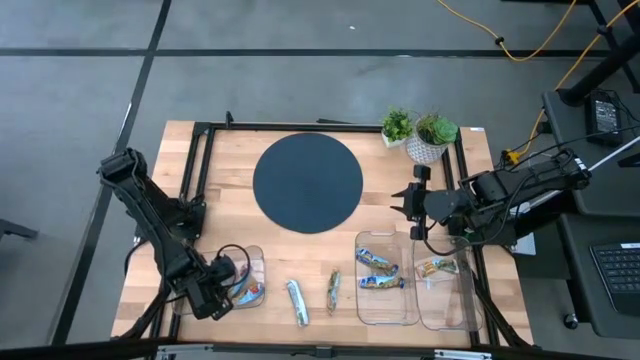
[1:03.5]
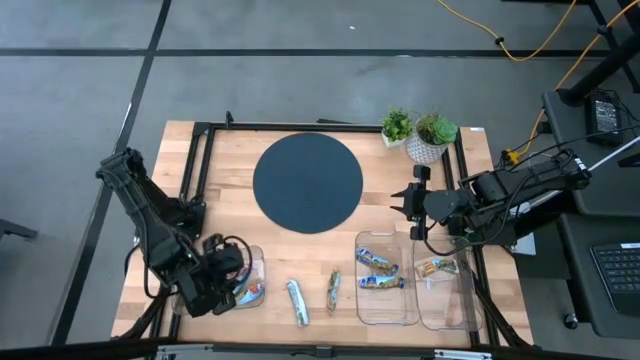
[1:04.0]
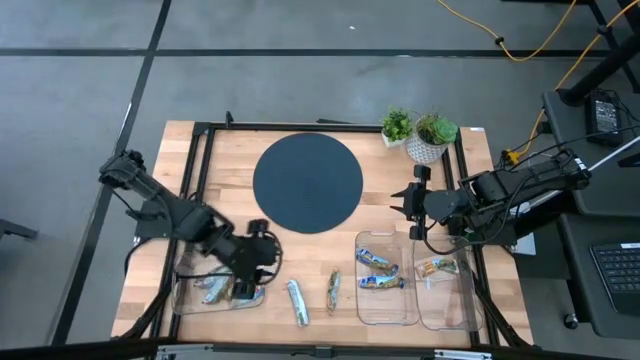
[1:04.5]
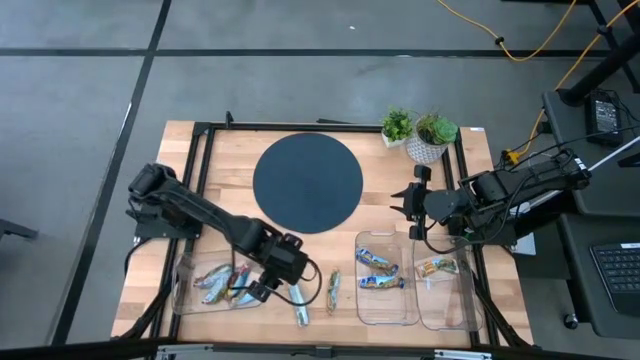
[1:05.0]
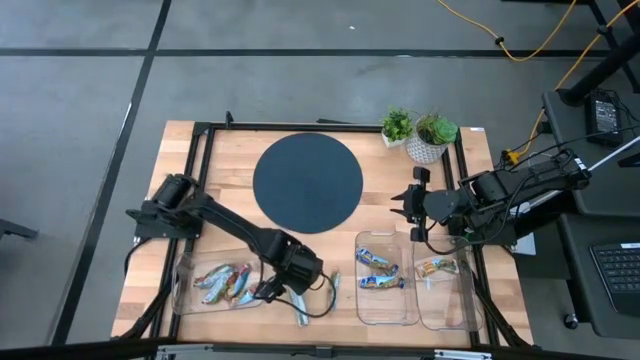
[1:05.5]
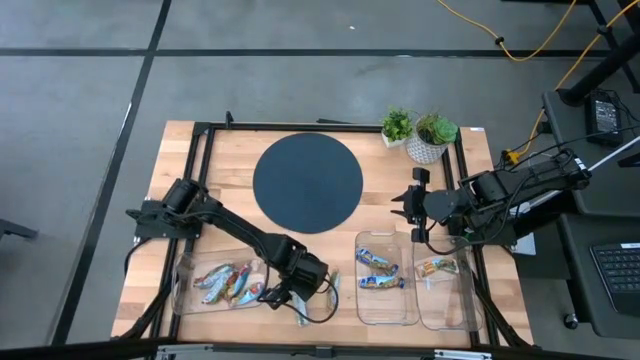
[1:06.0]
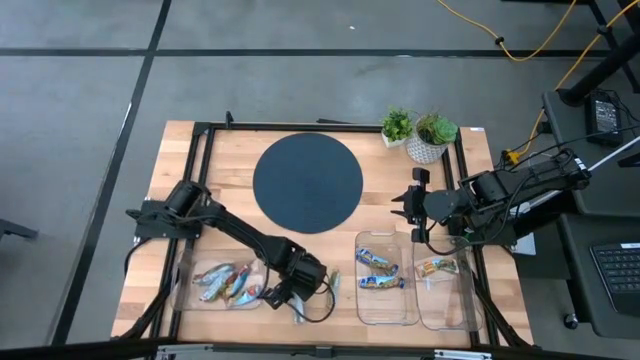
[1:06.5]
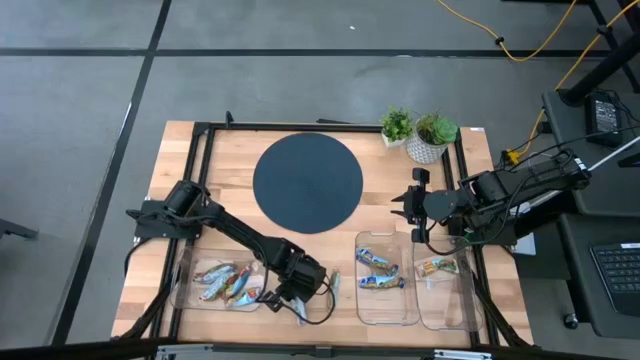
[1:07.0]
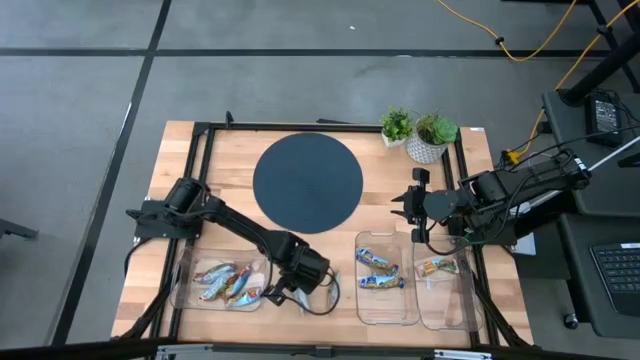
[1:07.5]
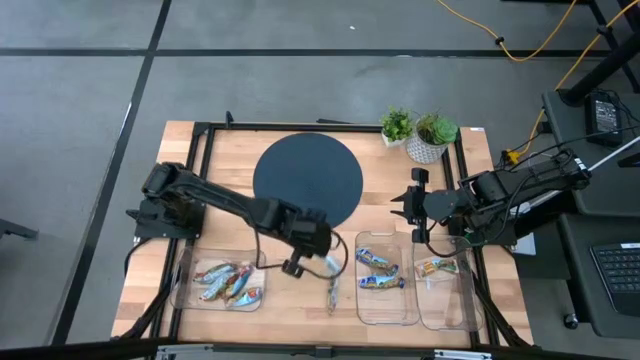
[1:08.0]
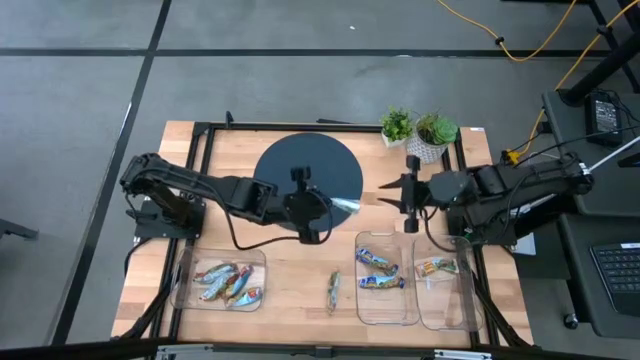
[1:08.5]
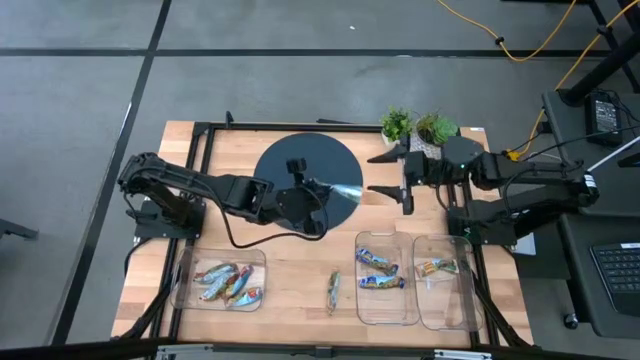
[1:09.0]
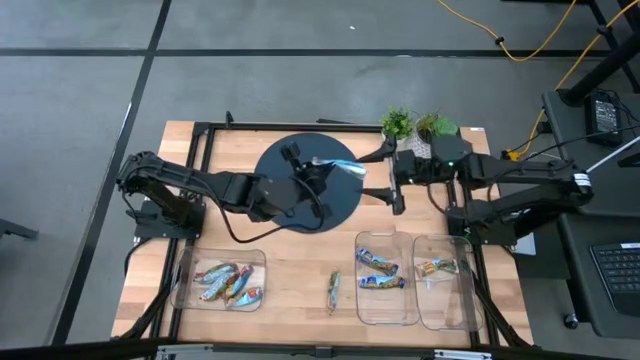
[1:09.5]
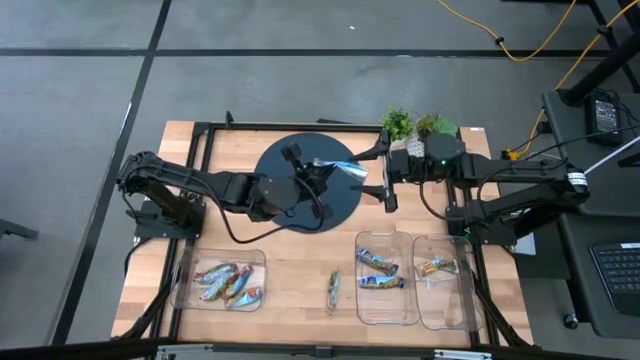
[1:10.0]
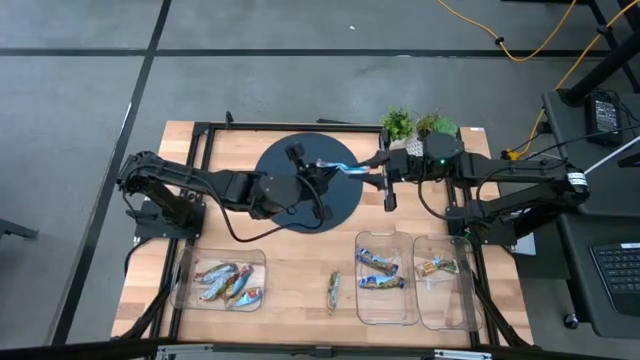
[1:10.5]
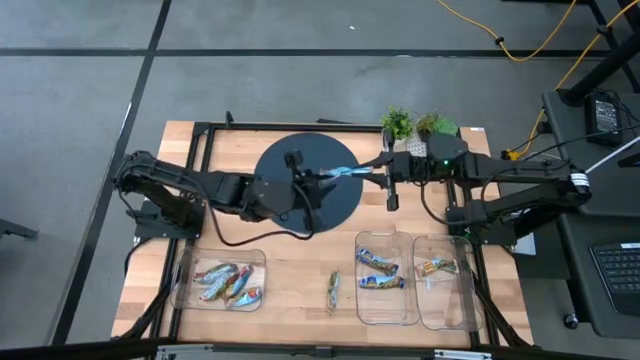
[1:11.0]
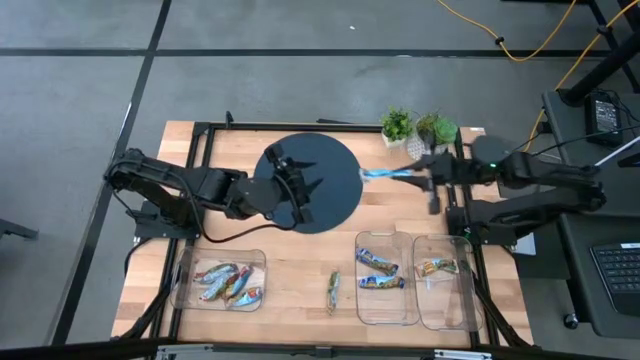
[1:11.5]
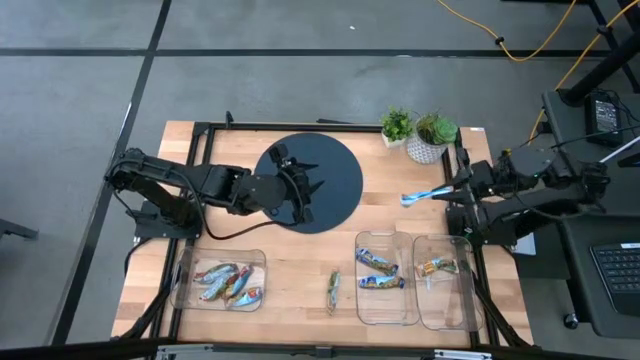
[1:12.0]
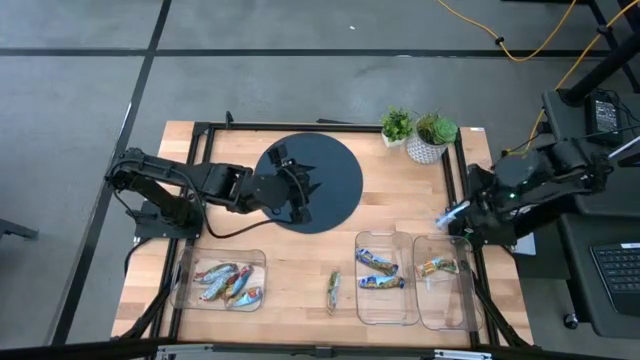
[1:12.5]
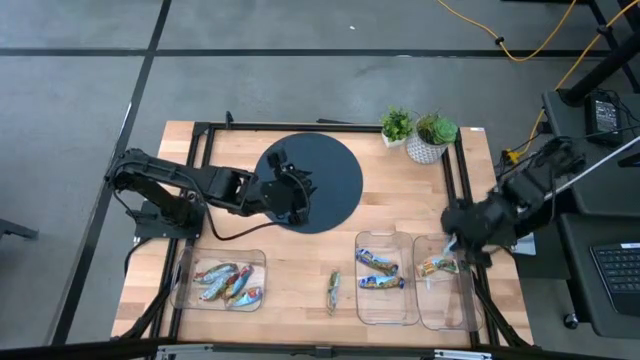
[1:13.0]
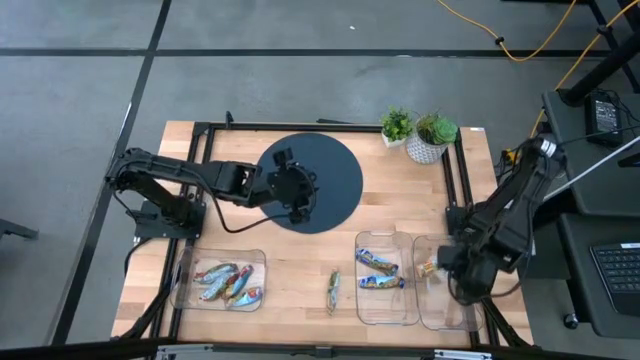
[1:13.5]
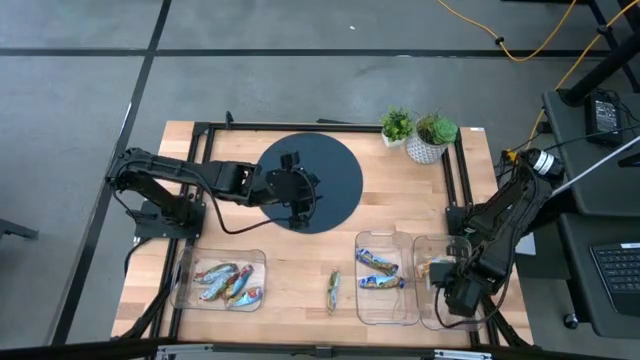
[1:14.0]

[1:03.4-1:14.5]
Task: Pick and place Granola Bars by type
Put the yellow granola bar into the right transparent bin

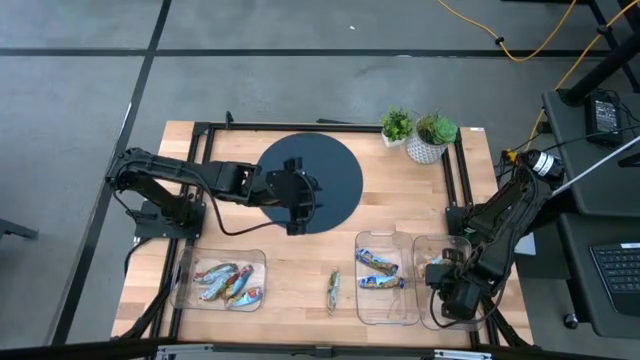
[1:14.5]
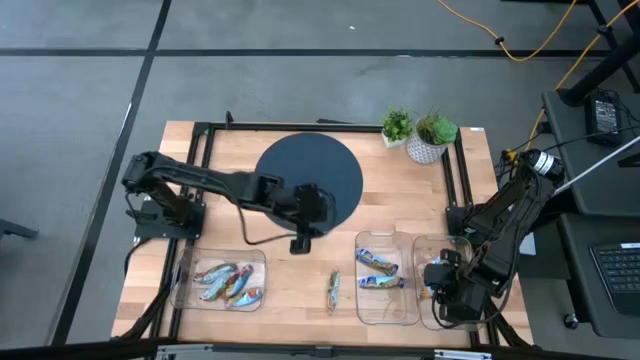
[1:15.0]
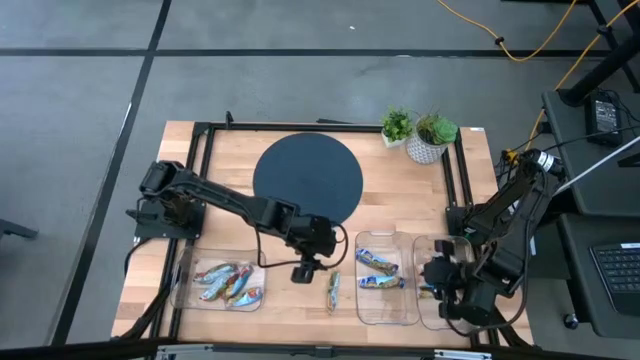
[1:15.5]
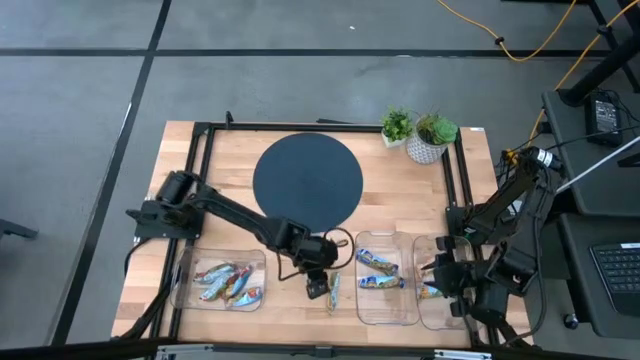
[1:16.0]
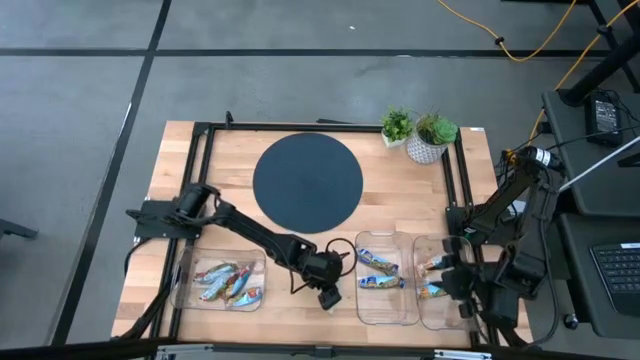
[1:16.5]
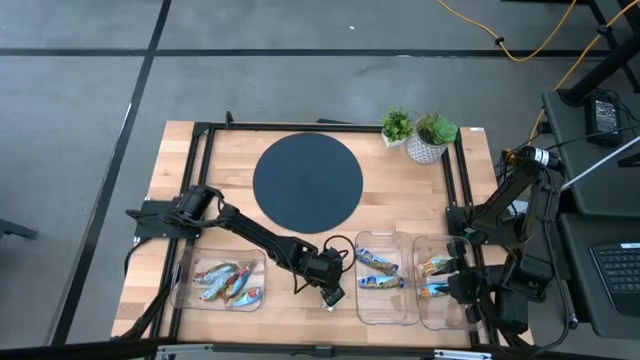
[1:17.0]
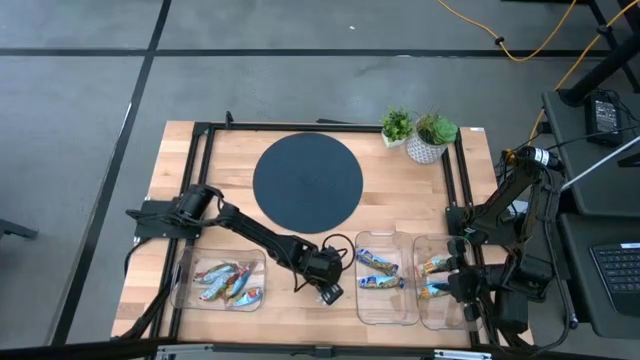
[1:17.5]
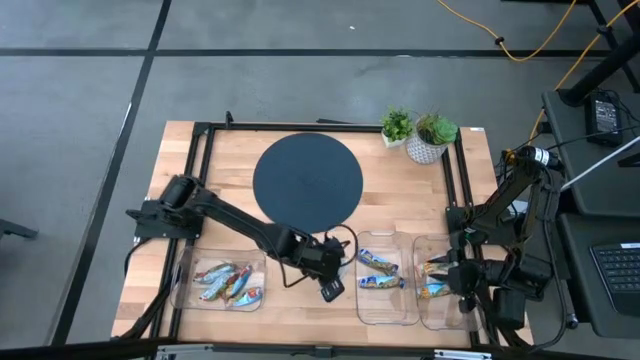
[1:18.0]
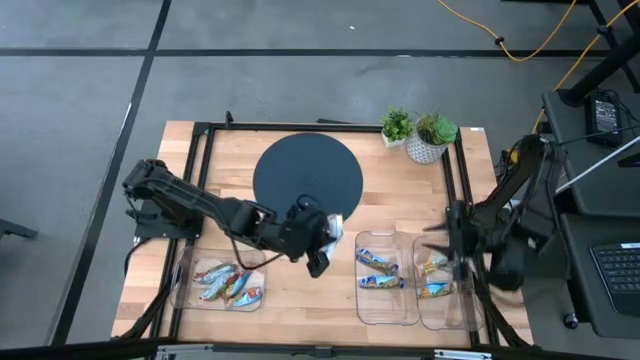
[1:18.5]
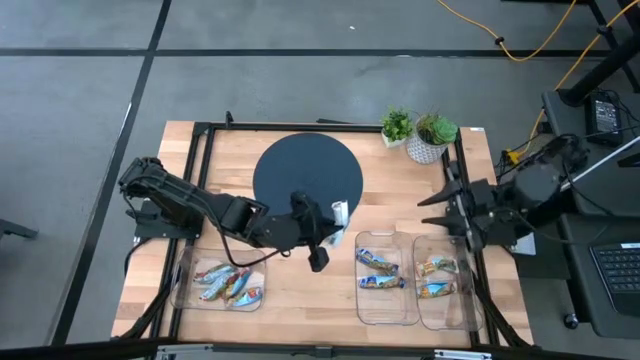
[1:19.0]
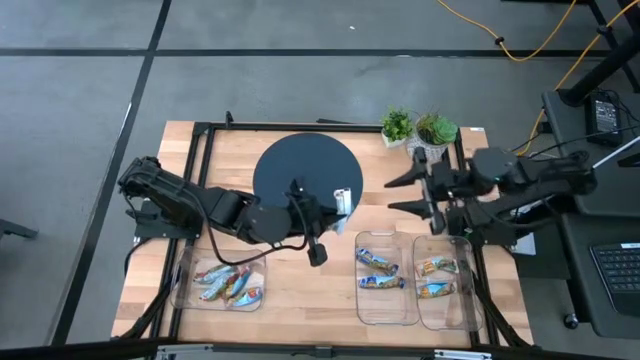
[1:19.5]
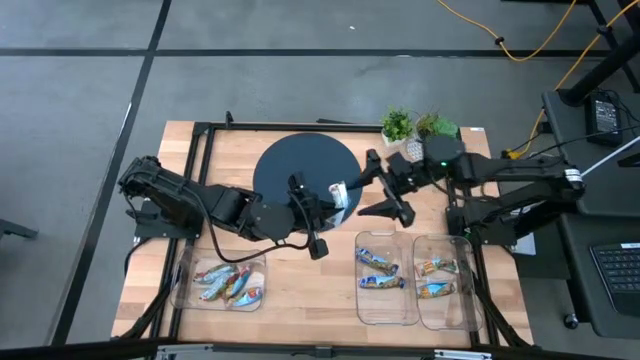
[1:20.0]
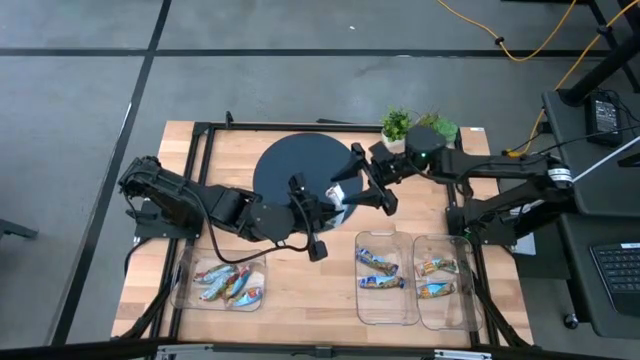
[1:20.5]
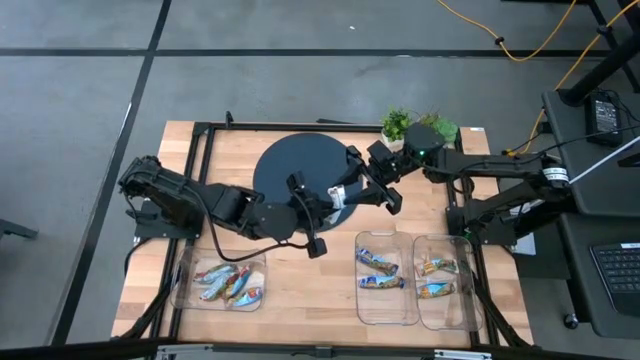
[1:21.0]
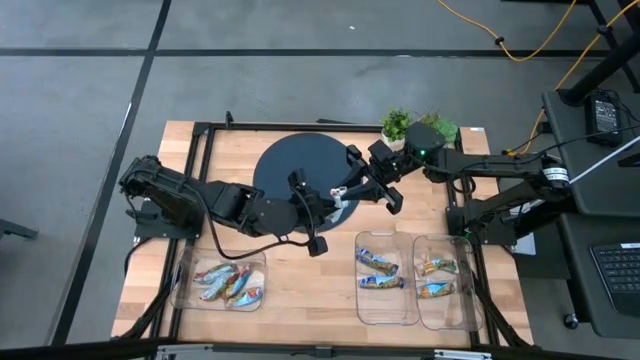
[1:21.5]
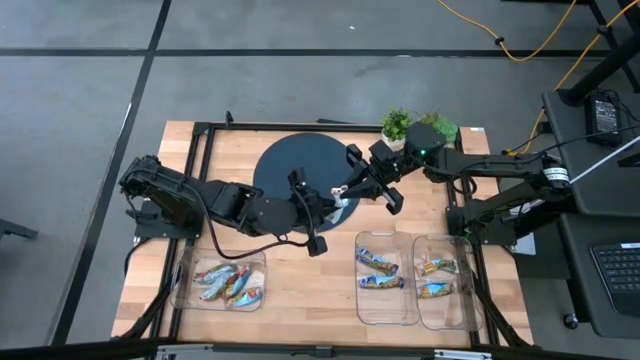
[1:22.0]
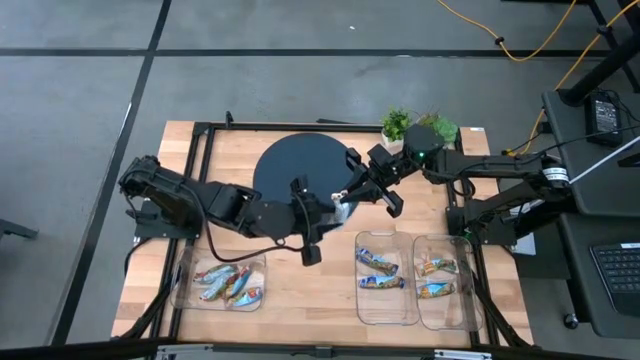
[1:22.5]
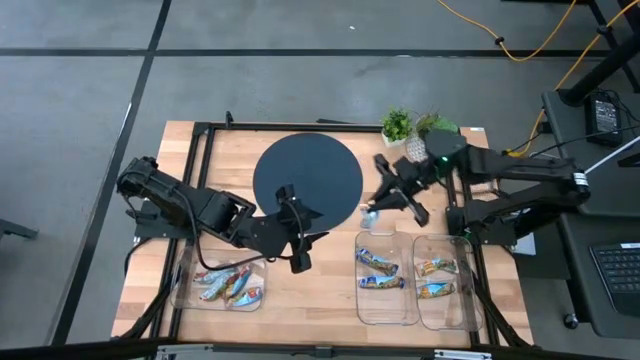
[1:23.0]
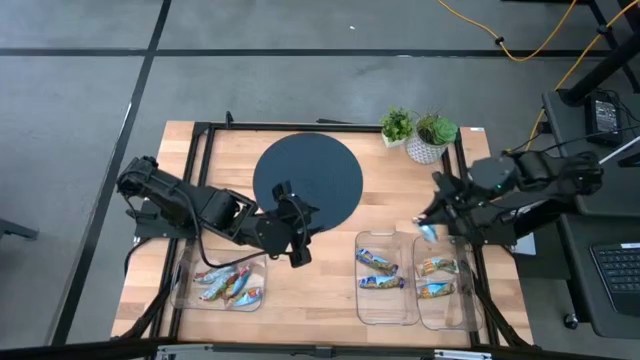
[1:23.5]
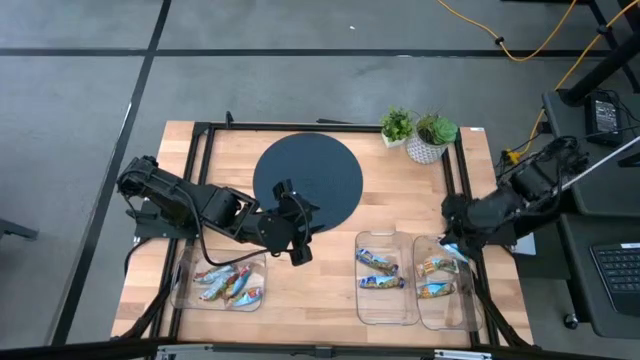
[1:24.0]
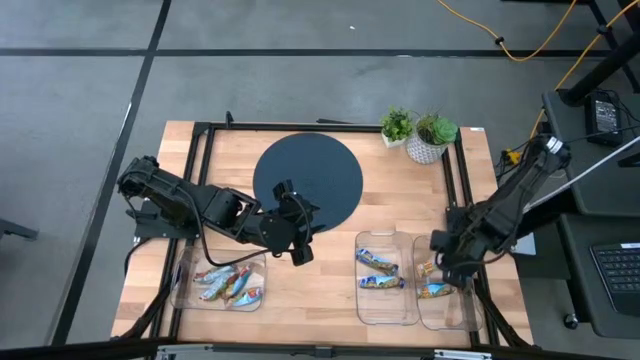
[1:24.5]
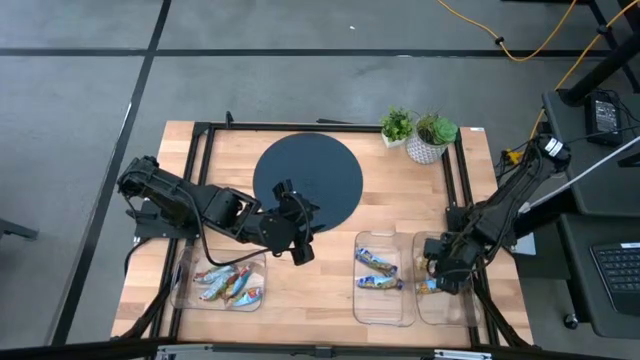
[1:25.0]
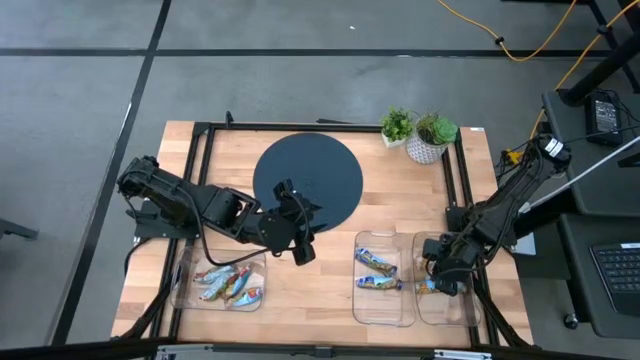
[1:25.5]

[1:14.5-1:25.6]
Put the yellow granola bar into the right transparent bin
